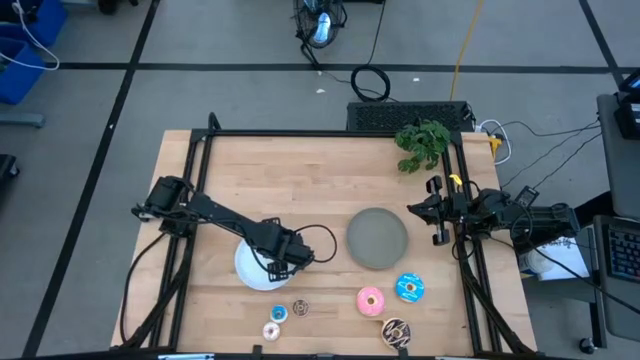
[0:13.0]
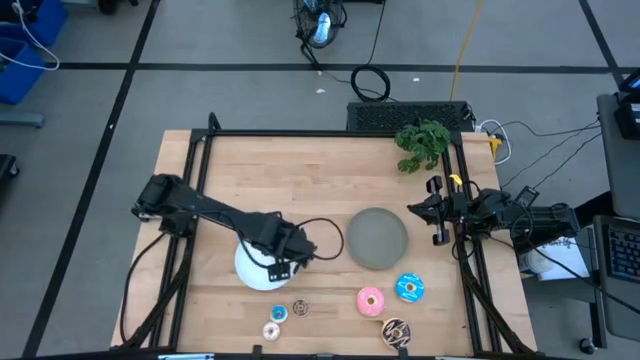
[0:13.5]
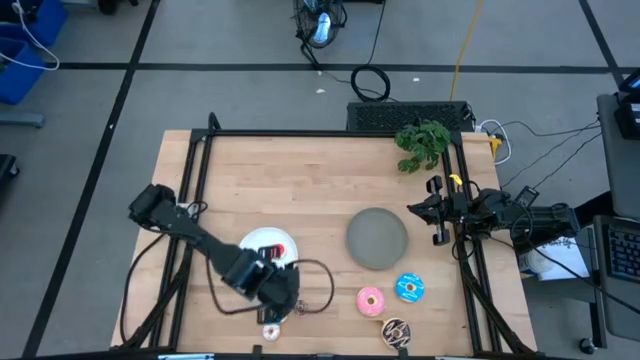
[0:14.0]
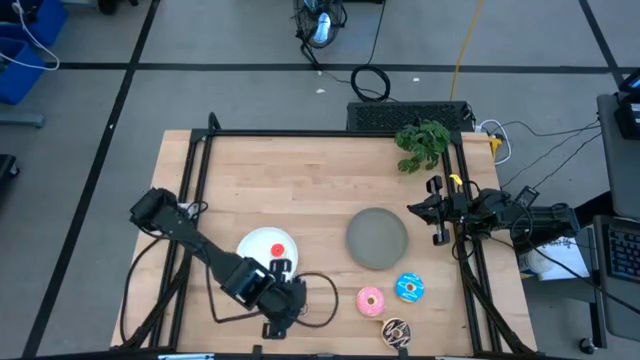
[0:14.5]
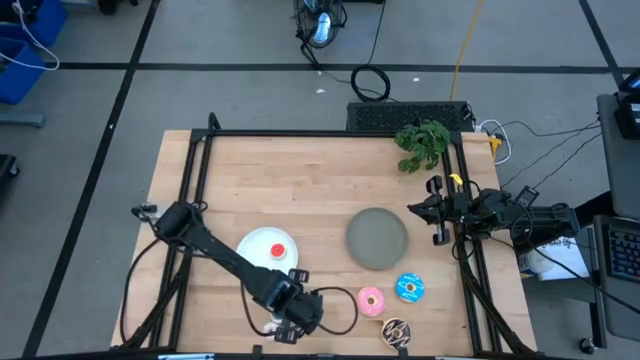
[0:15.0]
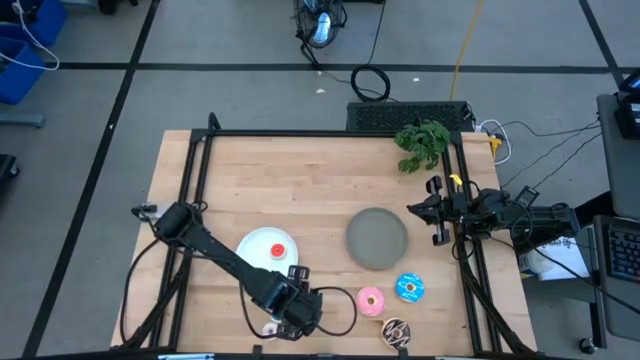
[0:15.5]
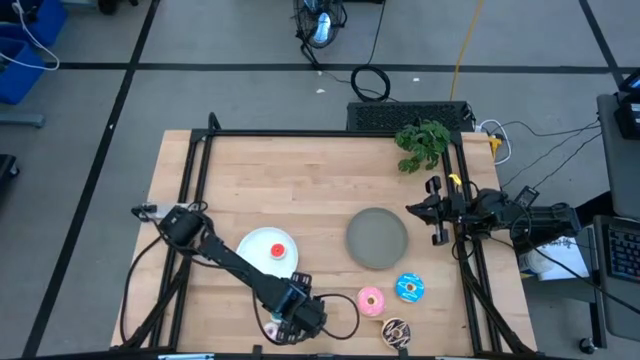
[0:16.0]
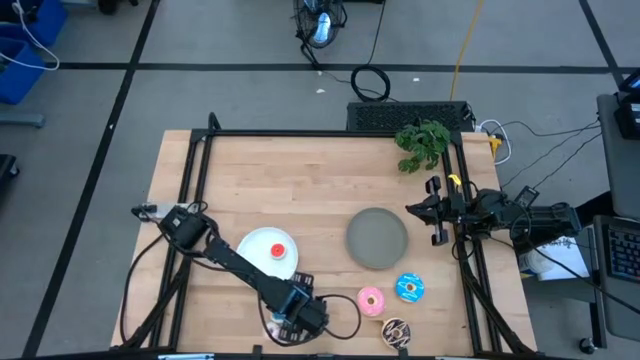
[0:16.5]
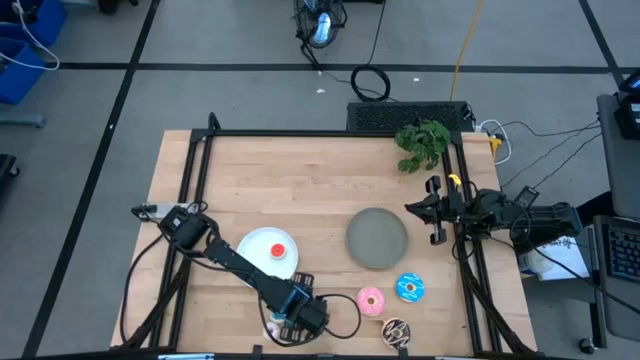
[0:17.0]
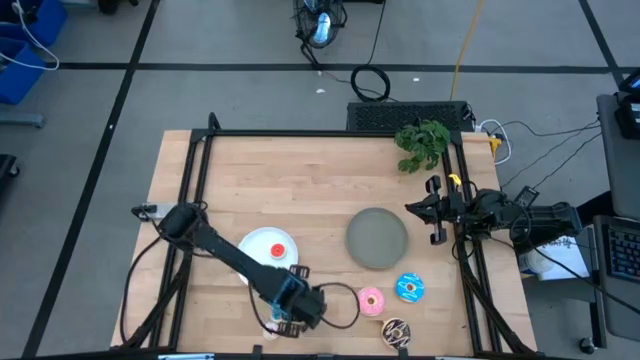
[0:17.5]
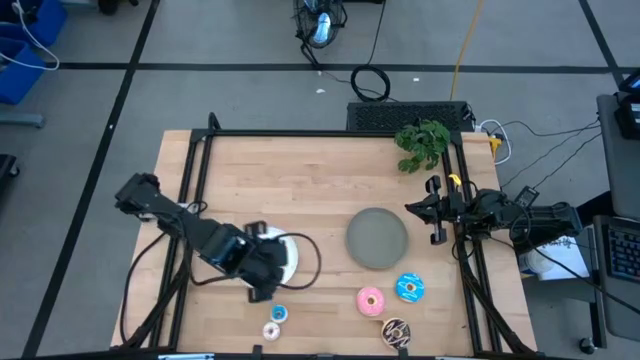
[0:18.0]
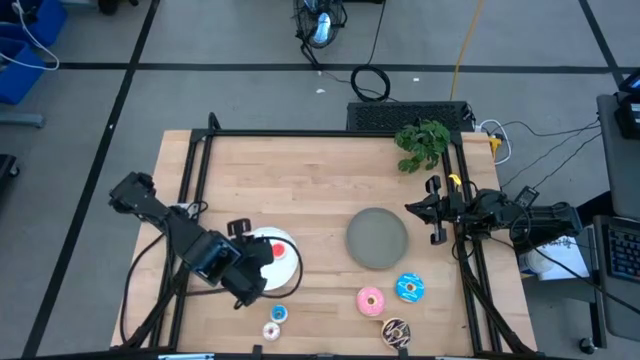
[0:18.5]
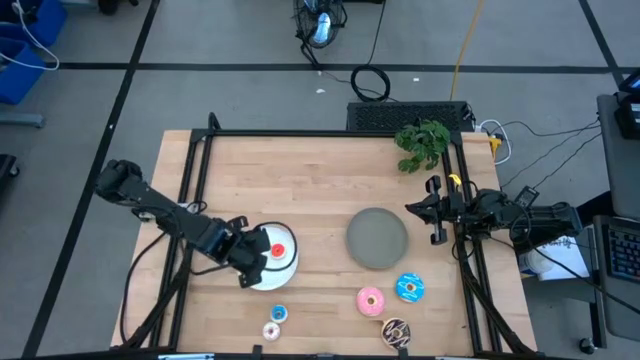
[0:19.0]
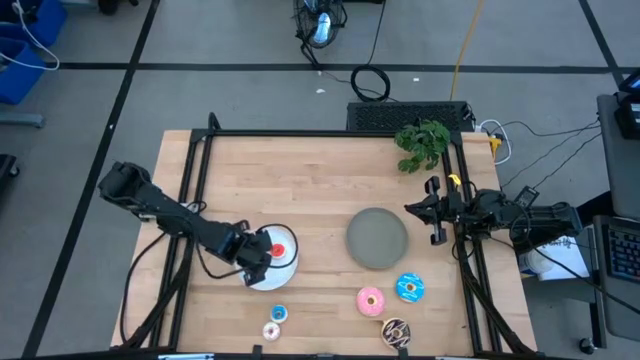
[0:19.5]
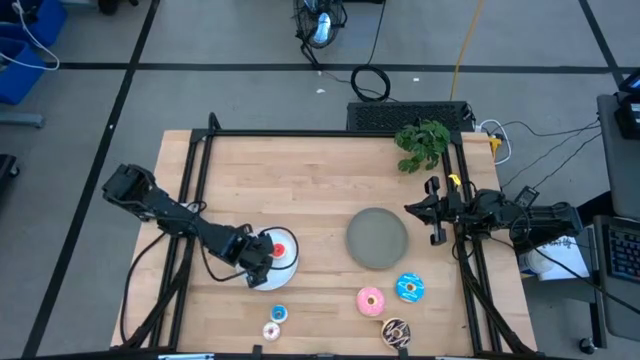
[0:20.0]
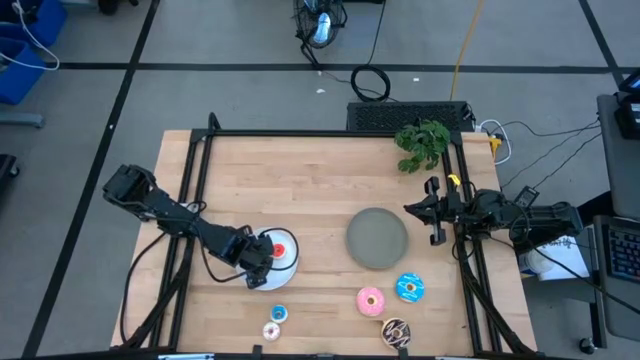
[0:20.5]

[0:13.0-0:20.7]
Task: Pick & Place donuts
Put the small brown donut on the white plate

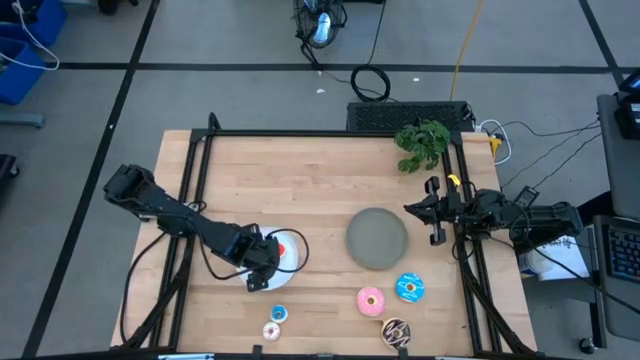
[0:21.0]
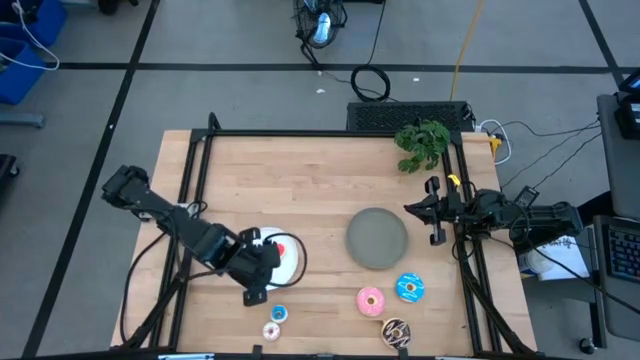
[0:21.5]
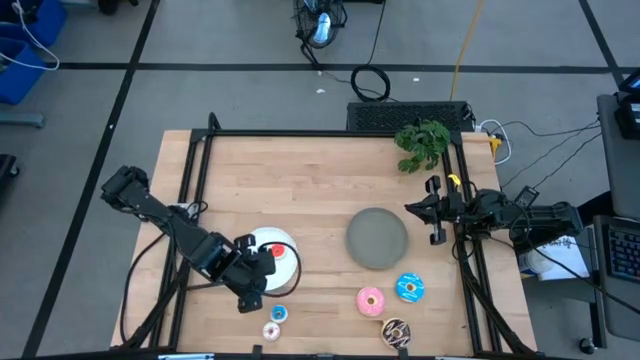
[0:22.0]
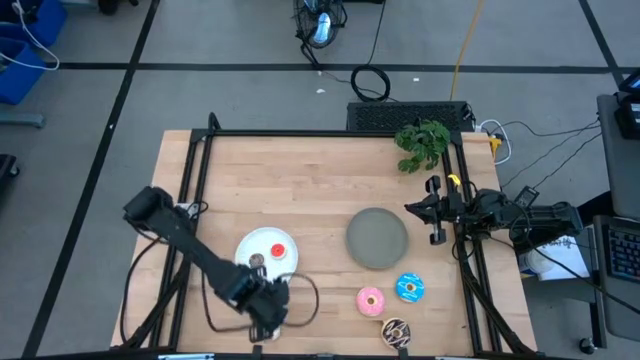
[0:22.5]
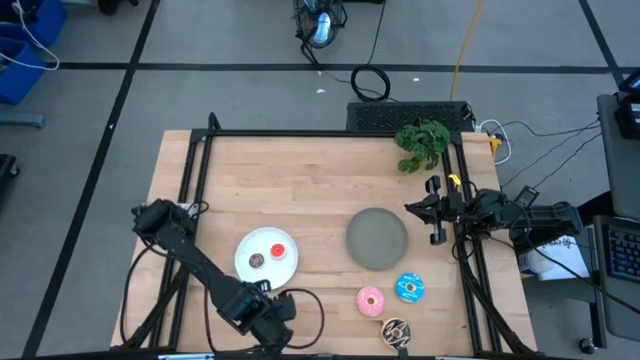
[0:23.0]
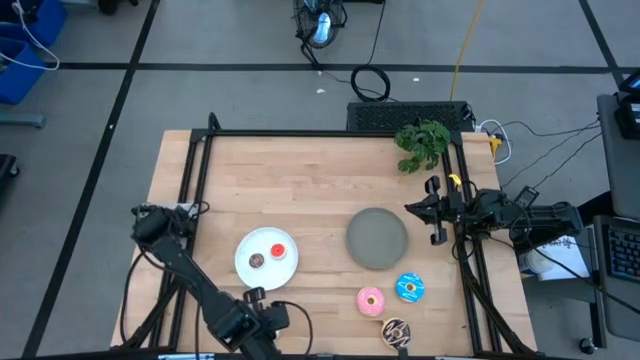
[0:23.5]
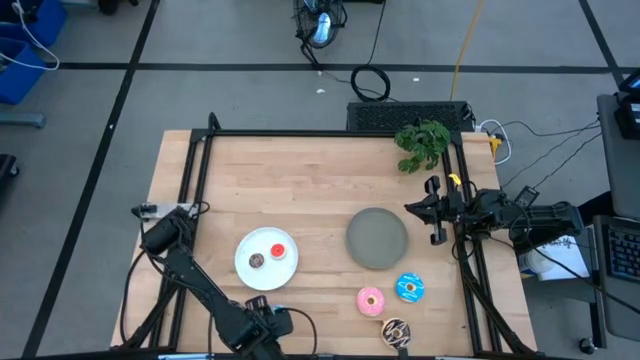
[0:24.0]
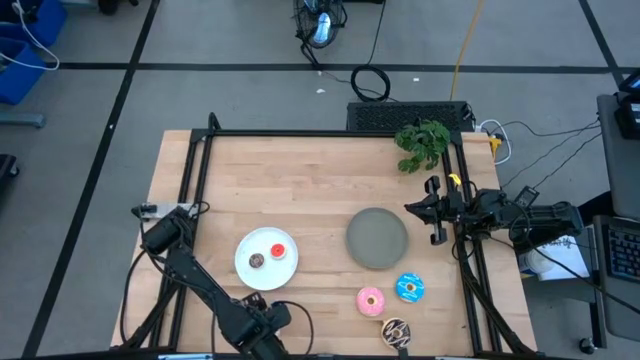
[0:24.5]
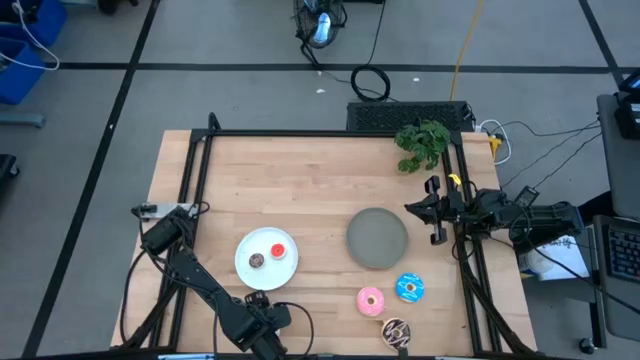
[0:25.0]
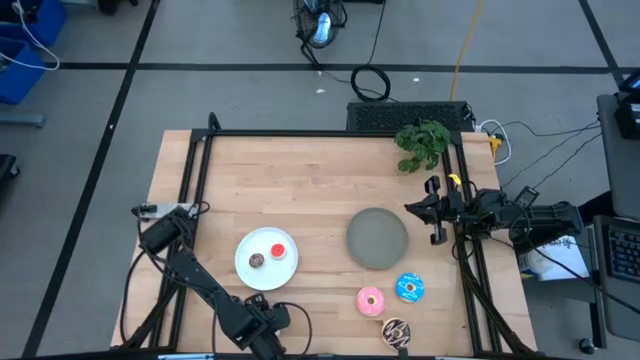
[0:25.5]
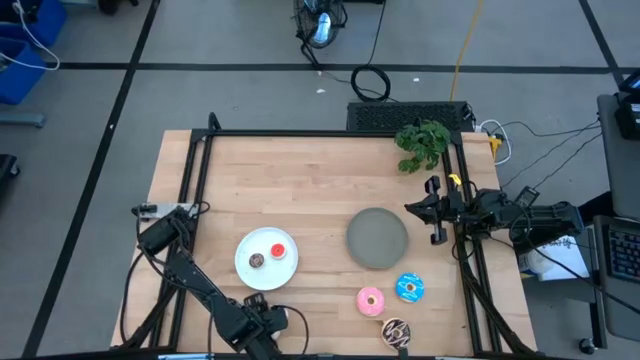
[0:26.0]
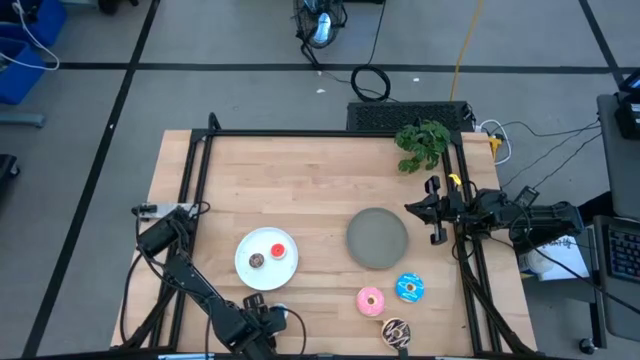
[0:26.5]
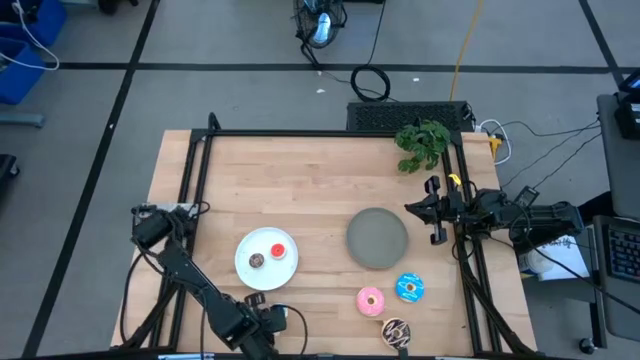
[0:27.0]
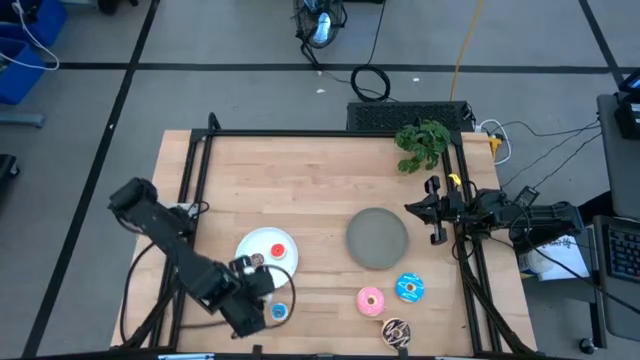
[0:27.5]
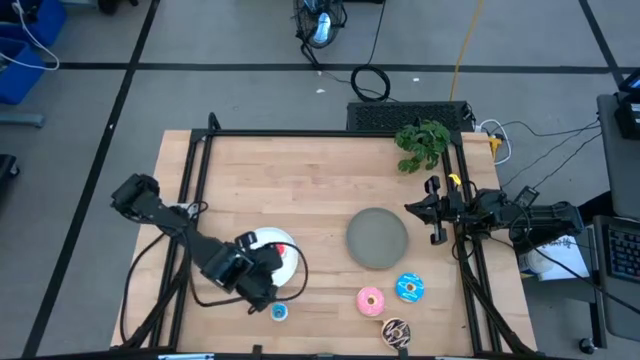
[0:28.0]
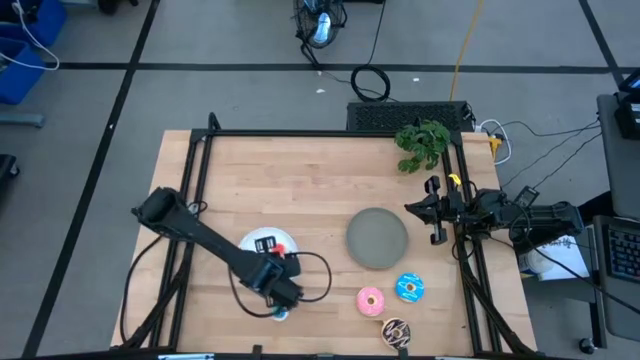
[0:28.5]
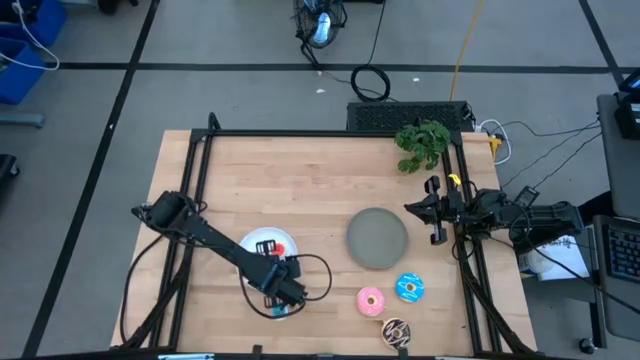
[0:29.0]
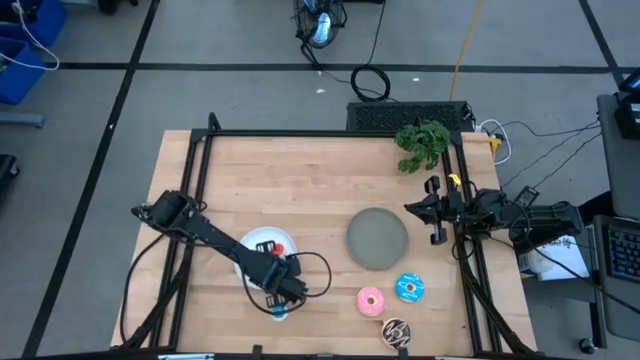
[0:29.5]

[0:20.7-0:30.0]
Put the small white donut on the white plate

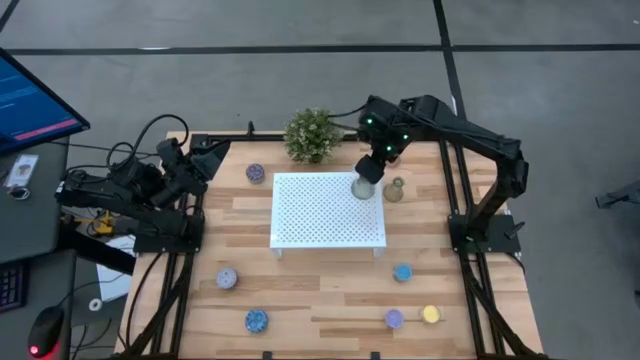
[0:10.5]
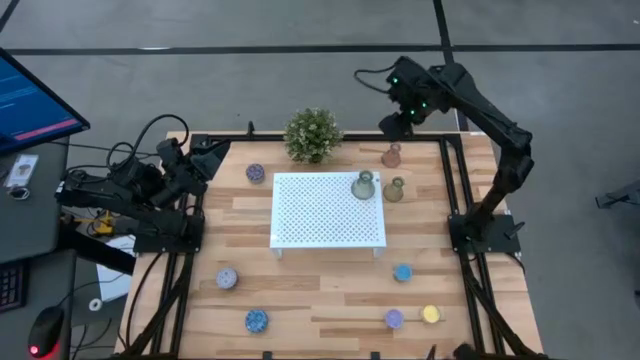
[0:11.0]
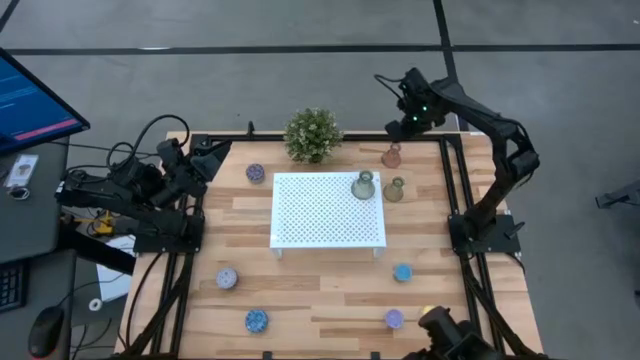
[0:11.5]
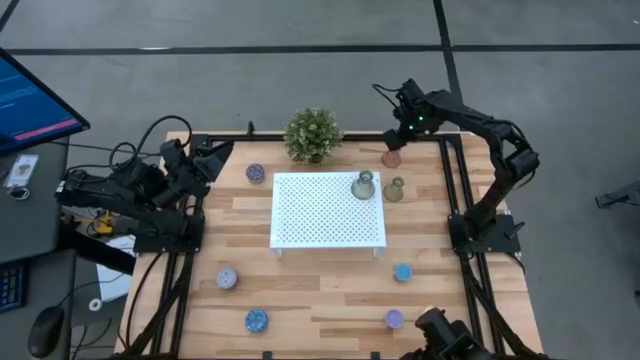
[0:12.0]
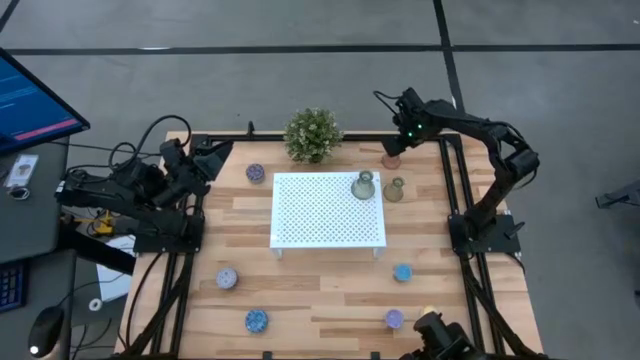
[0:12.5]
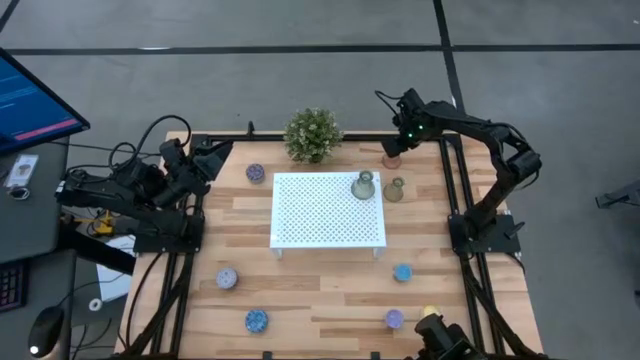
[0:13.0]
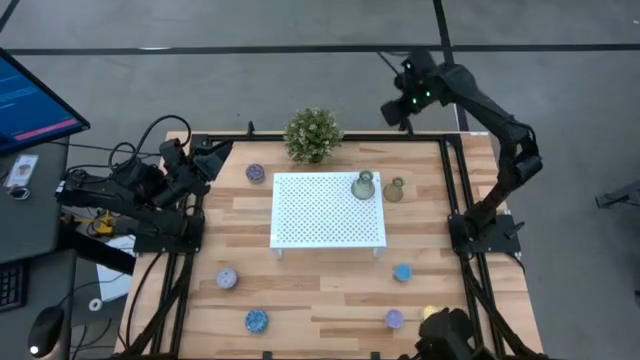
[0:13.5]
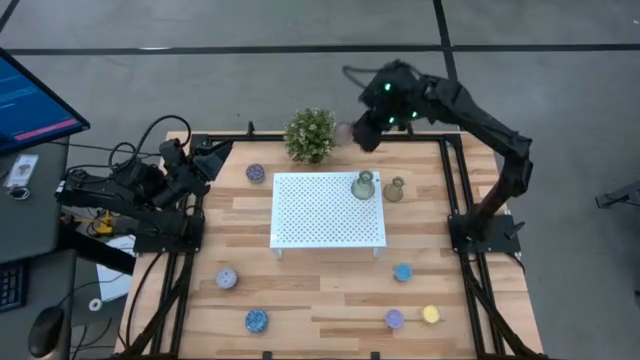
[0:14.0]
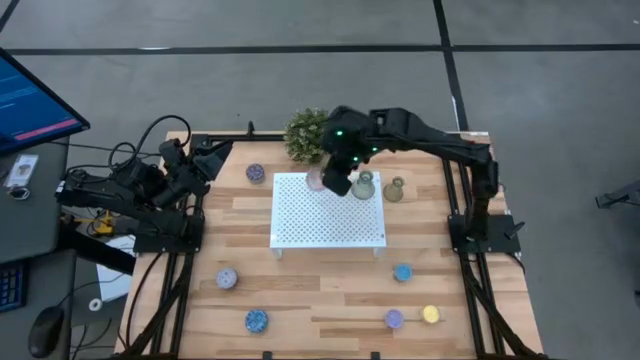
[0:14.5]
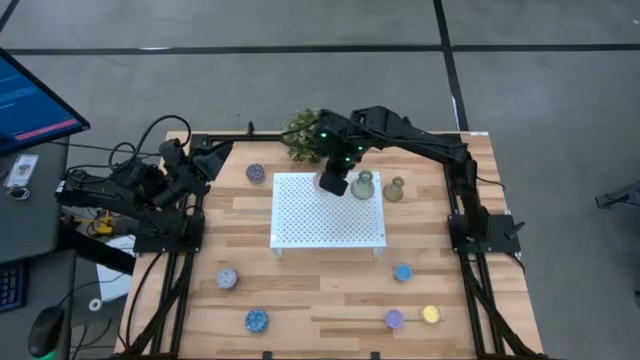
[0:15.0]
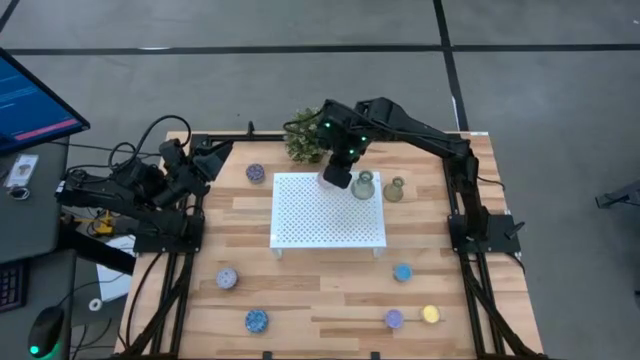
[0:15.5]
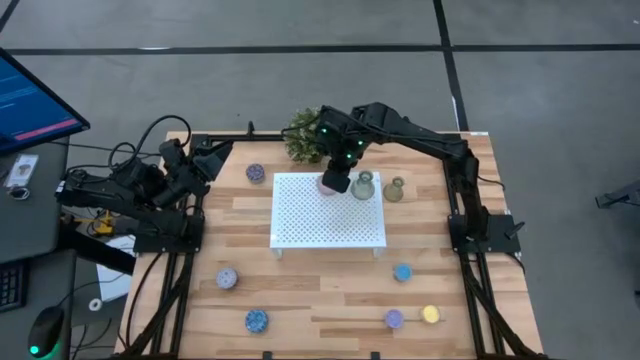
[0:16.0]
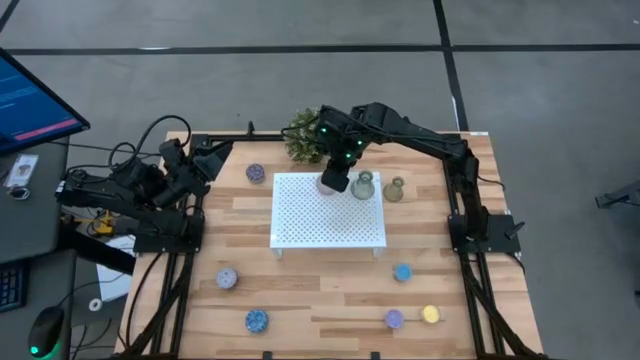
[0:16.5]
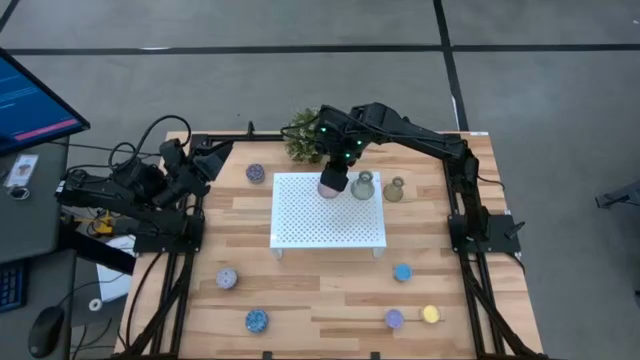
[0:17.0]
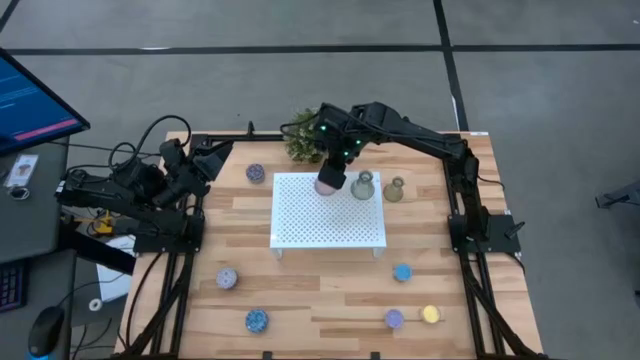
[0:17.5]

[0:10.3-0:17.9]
Task: Pick & Place candle stick holders
Put the violet glass candle holder on the shelf
